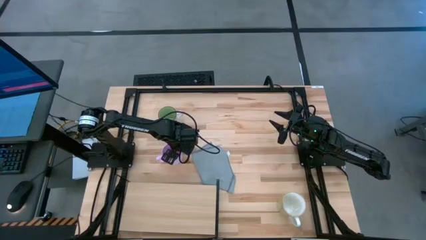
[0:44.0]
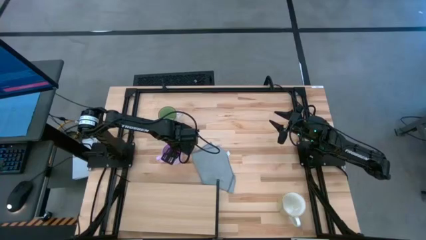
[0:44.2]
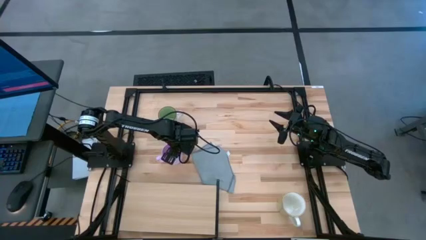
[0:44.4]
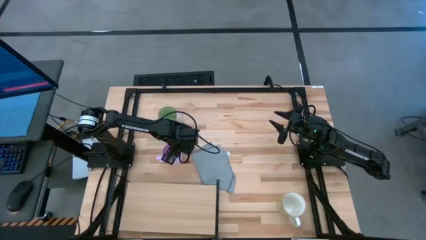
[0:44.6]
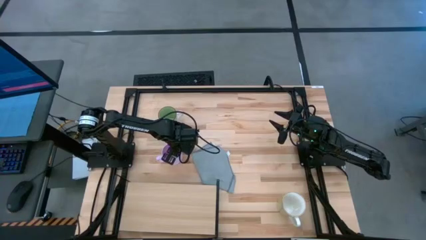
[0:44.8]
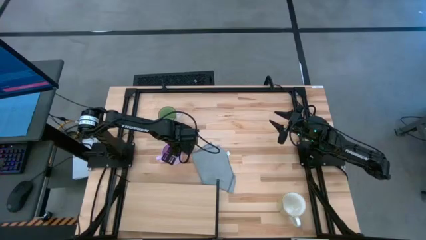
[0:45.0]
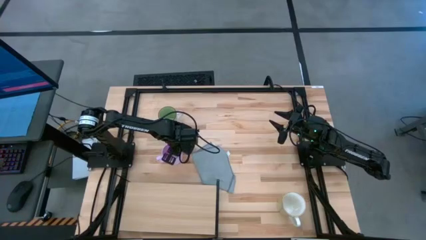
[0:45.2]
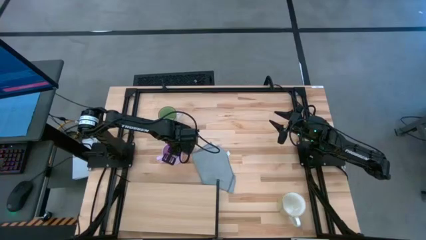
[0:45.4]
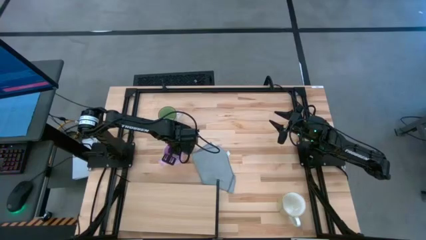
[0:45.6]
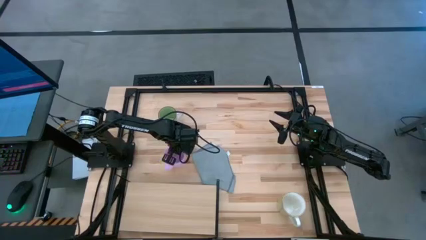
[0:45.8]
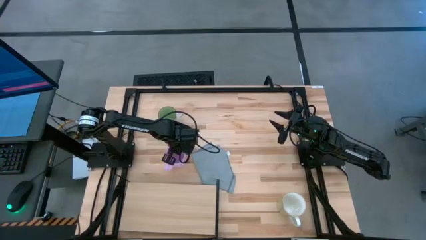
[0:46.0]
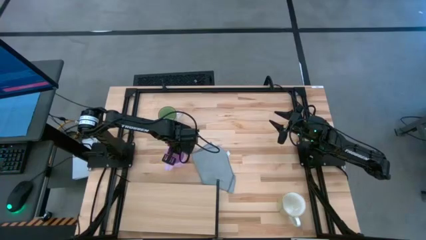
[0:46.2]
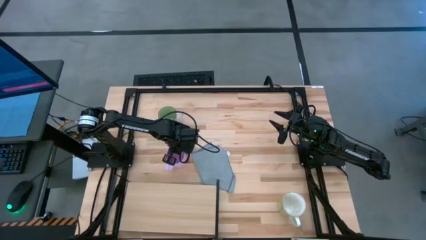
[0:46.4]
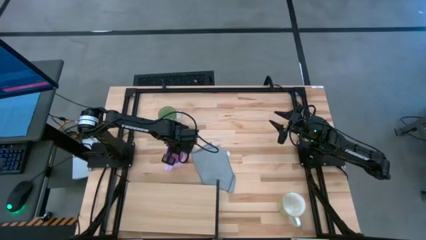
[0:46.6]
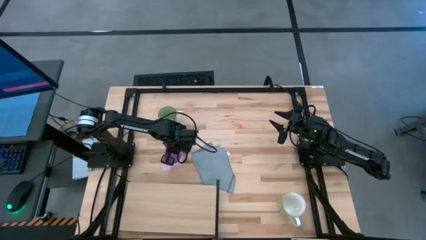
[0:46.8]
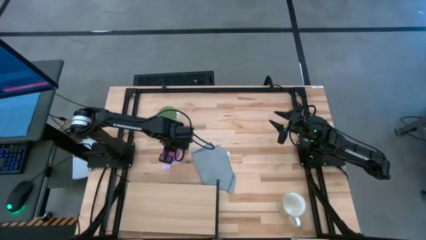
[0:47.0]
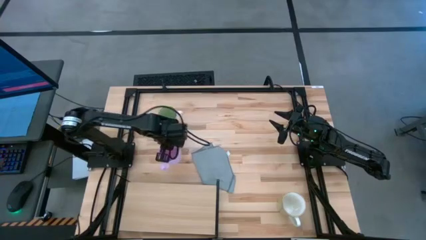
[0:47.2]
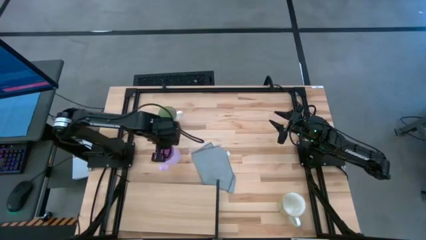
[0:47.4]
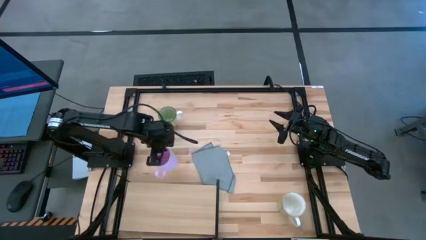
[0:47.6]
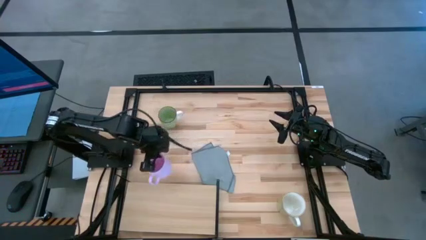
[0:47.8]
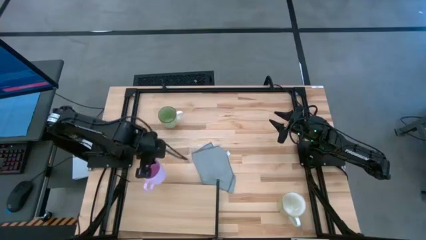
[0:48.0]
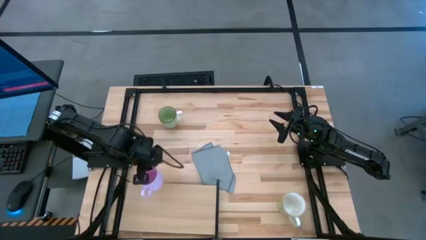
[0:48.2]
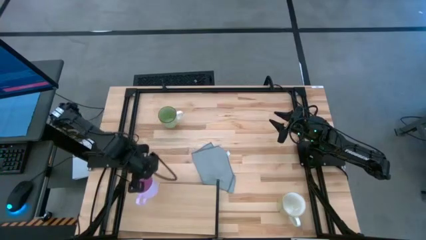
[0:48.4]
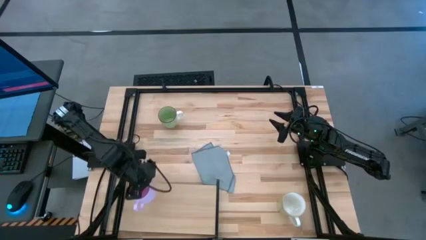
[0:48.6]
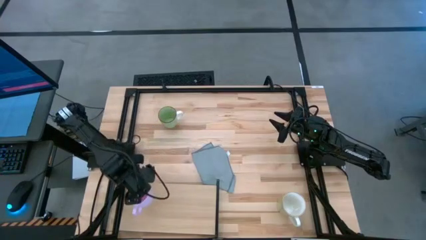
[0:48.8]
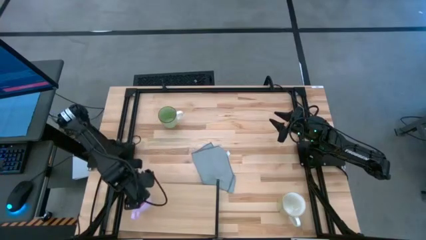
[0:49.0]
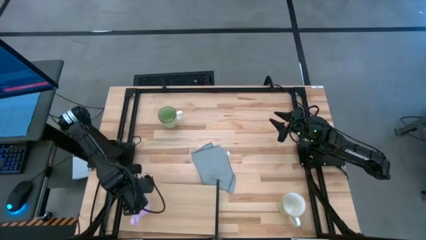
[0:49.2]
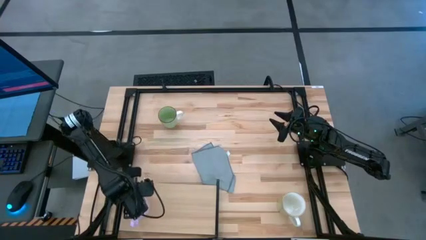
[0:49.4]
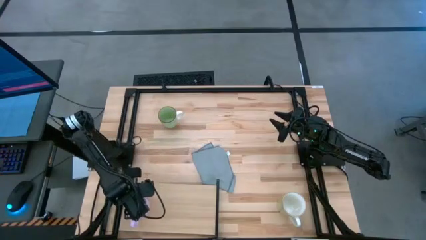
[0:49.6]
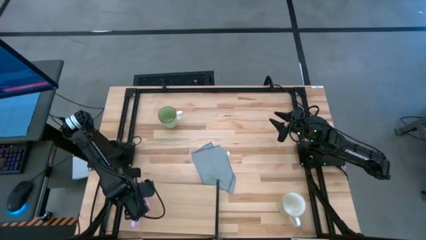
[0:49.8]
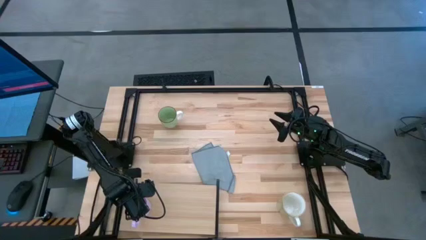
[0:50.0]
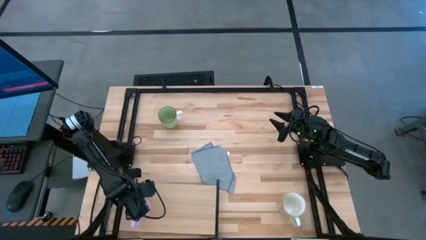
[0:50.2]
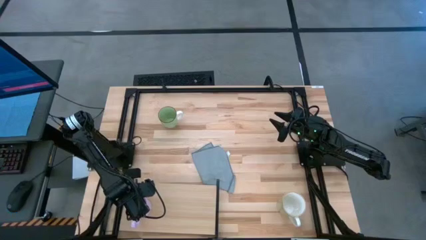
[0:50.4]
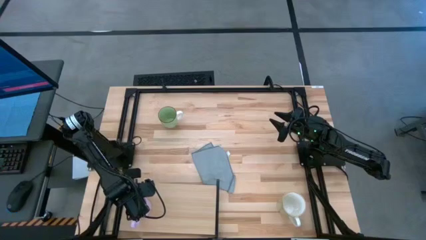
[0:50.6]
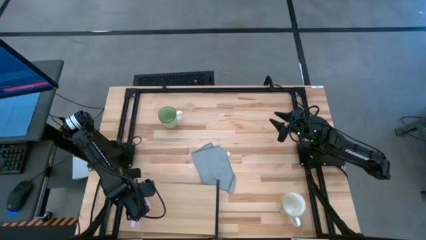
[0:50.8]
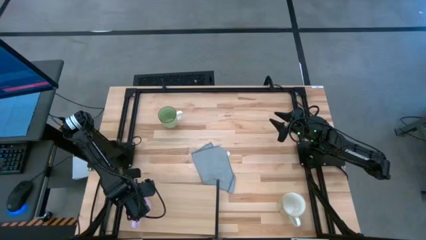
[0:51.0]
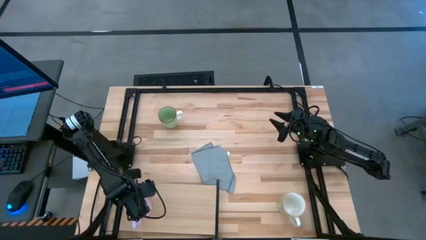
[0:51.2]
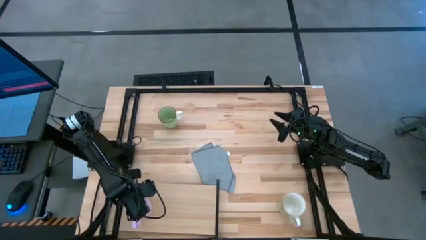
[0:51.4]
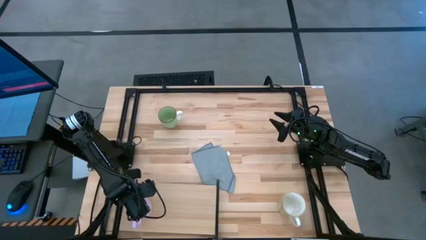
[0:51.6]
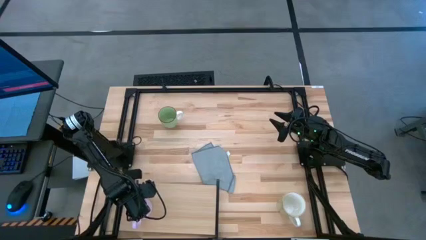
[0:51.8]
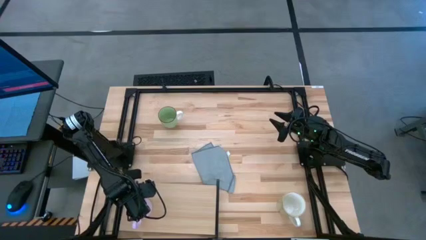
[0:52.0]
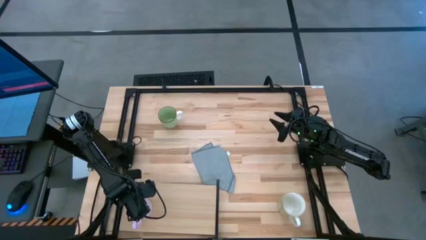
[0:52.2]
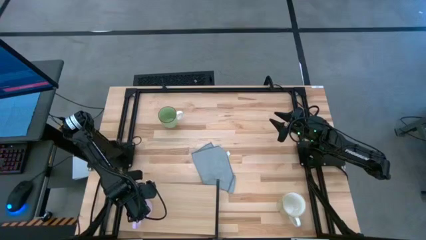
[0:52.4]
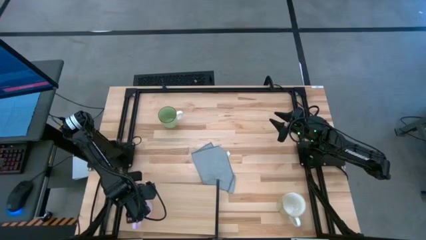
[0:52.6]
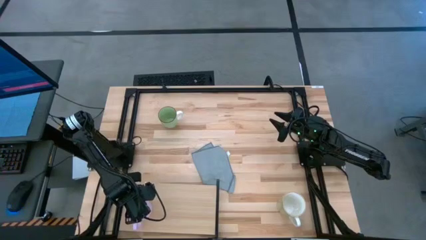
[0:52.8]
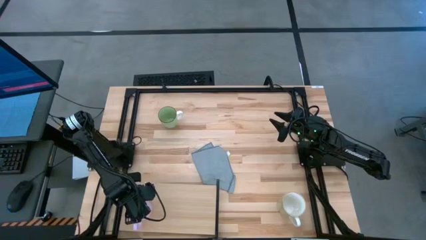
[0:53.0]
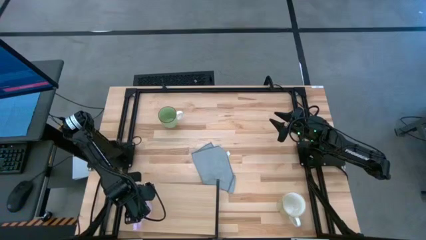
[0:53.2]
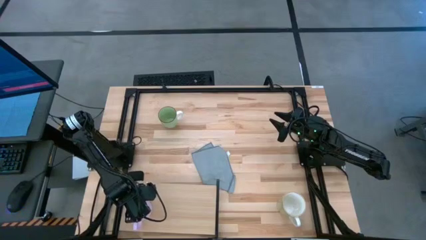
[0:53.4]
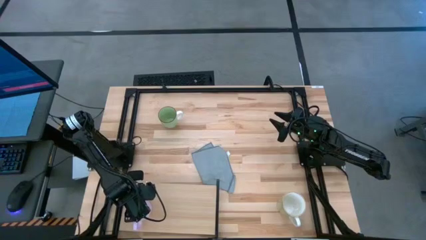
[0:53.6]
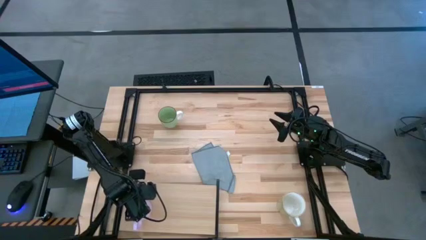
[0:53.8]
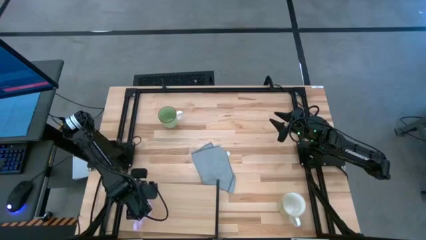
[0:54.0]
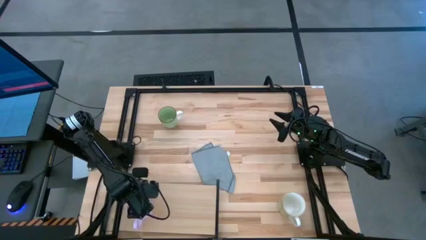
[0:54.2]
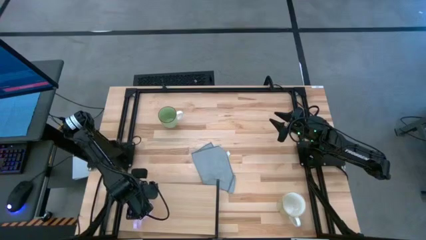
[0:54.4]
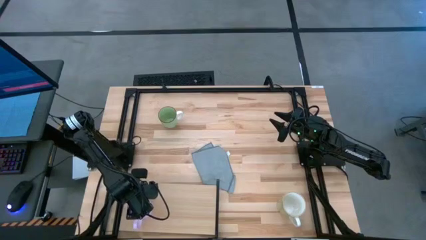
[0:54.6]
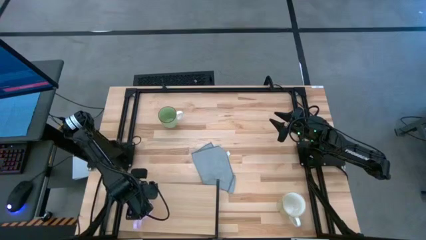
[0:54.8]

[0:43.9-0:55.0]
Task: Stack small to large cups/mugs on shelf
Put the pink mug on the shelf
